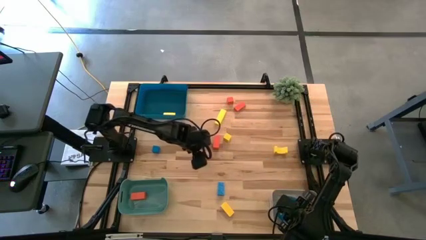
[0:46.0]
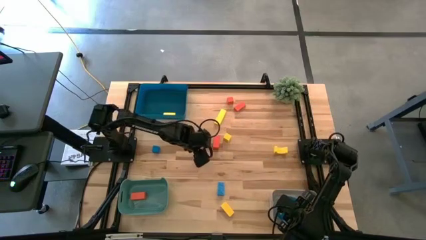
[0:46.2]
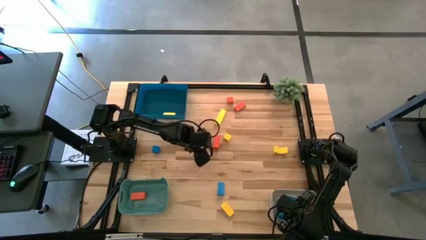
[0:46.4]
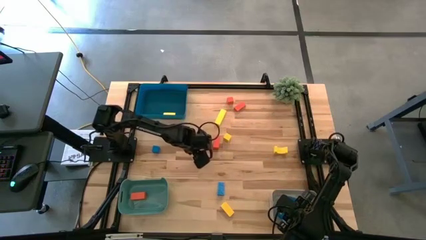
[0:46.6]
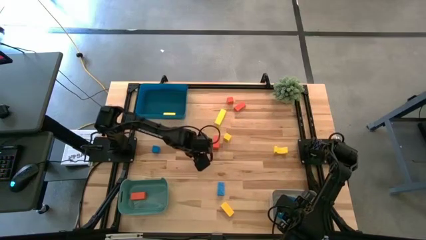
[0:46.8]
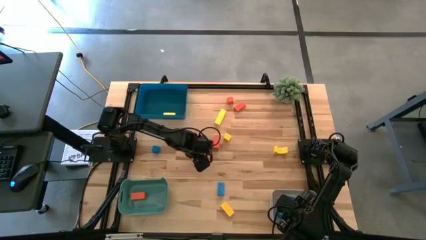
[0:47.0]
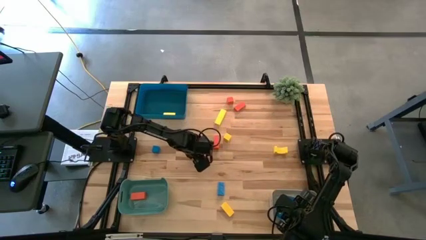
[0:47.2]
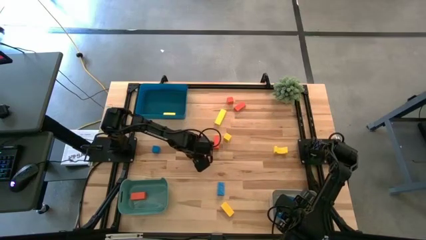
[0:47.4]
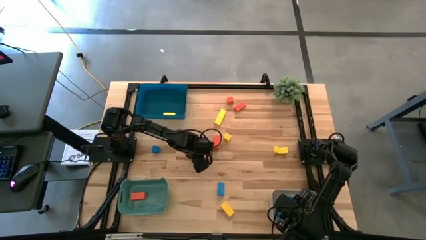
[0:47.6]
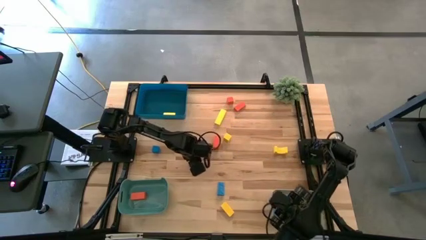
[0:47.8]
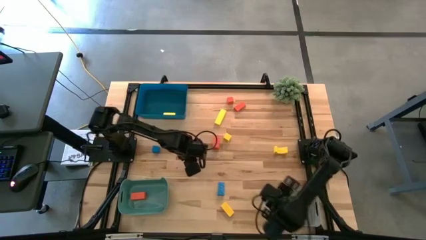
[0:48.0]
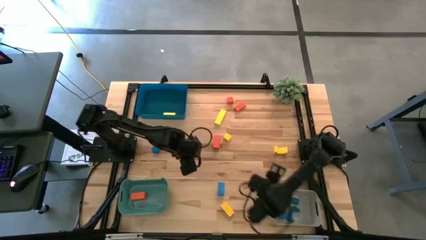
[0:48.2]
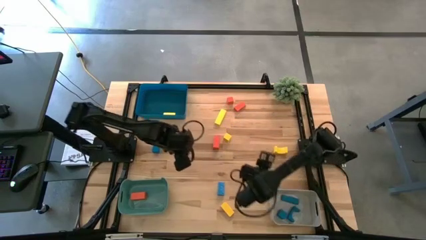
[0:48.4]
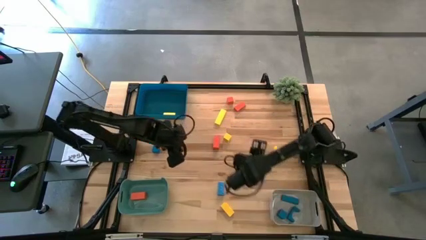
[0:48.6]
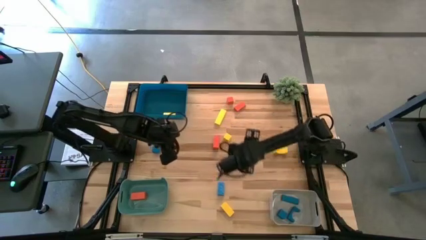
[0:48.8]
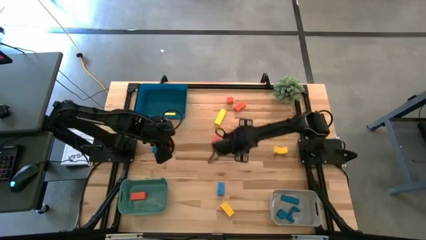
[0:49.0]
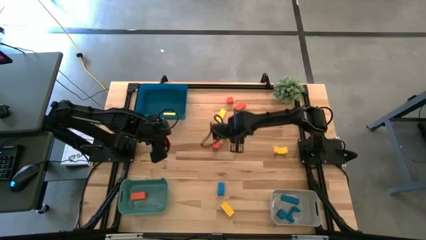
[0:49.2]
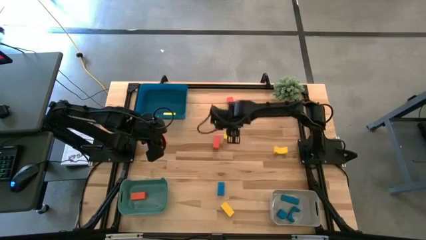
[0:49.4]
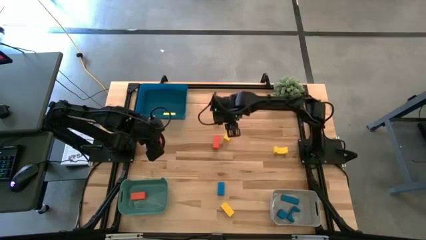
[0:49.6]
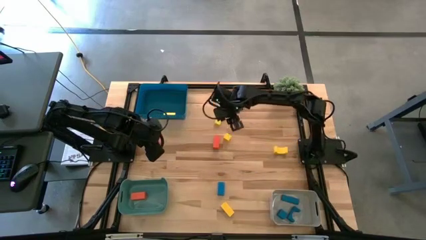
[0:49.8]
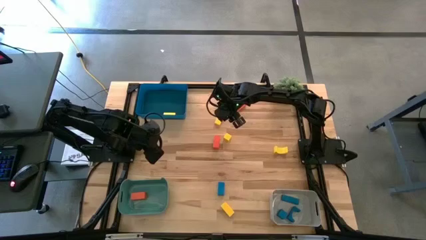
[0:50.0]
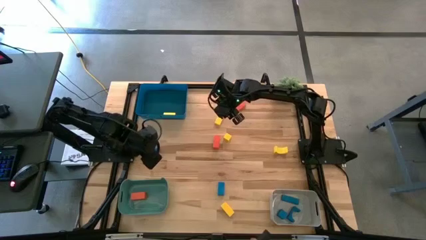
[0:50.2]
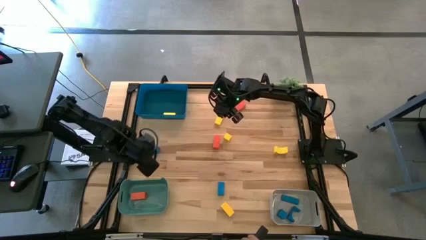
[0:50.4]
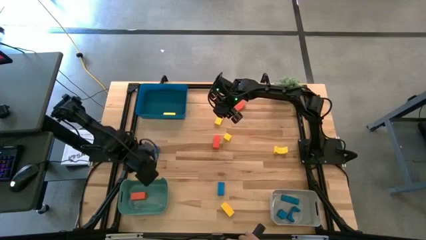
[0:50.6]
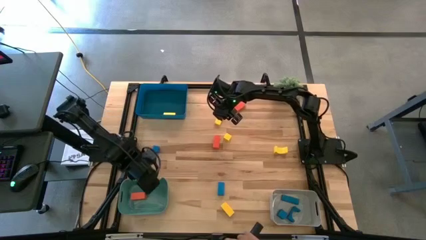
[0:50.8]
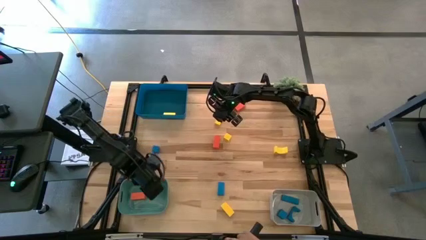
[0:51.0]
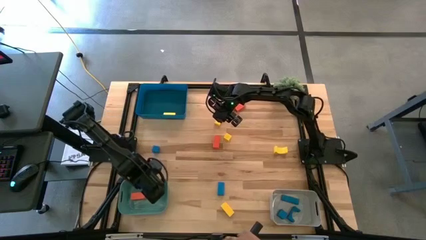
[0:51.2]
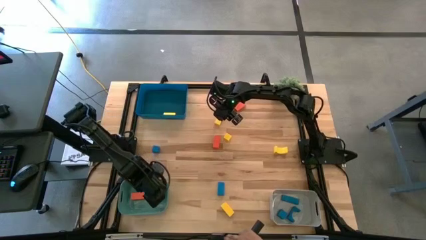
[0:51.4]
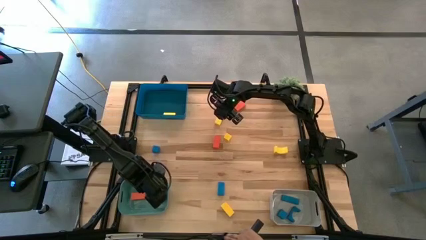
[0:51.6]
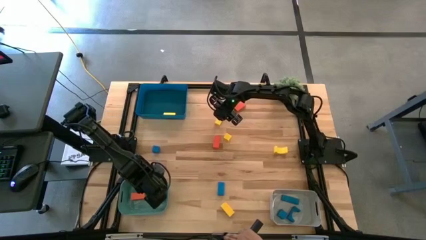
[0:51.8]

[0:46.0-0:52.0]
Task: Sort & place blocks by color
Put the bottom orange block into the green bin

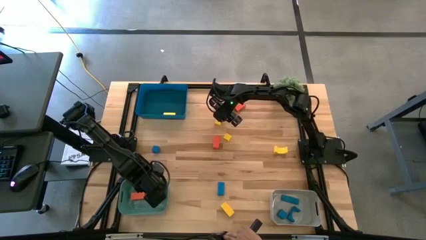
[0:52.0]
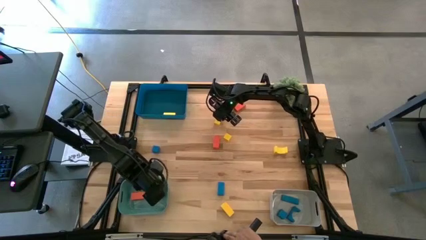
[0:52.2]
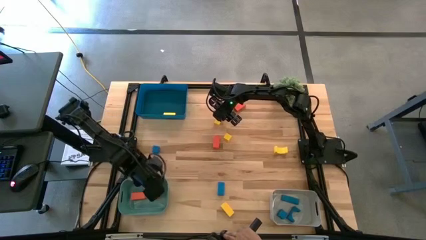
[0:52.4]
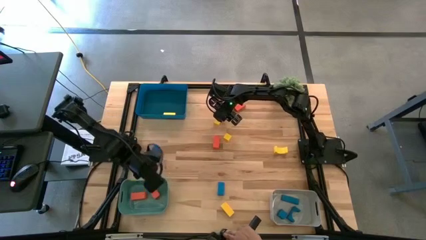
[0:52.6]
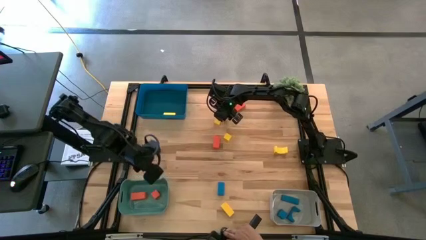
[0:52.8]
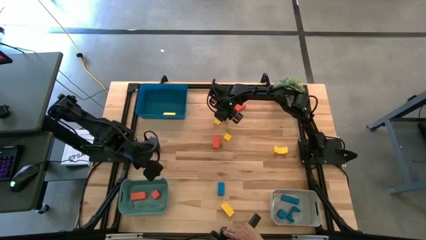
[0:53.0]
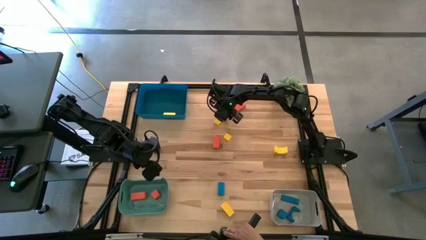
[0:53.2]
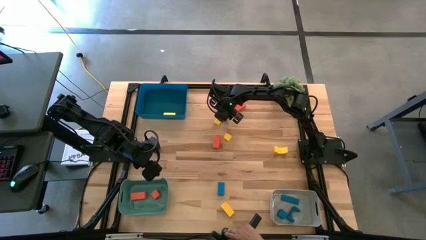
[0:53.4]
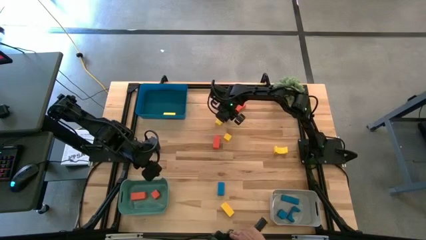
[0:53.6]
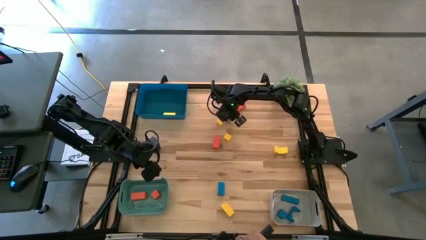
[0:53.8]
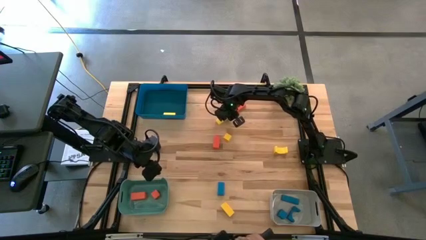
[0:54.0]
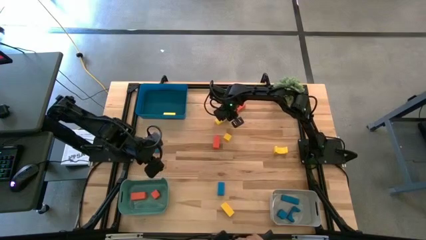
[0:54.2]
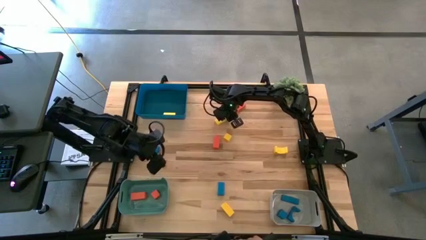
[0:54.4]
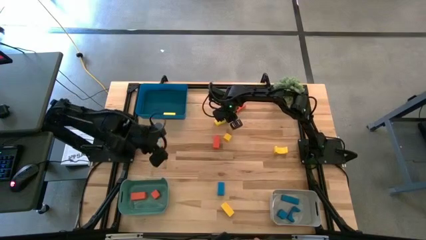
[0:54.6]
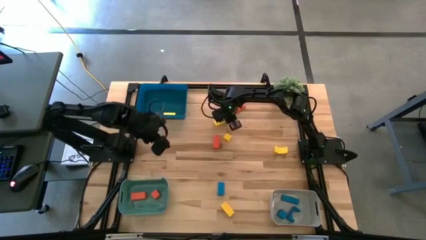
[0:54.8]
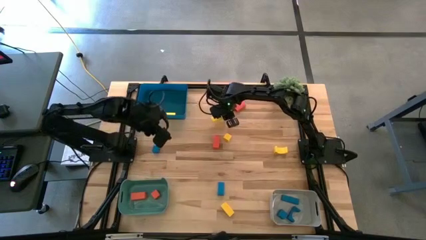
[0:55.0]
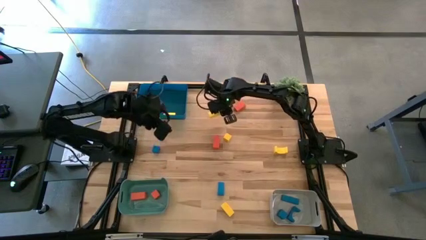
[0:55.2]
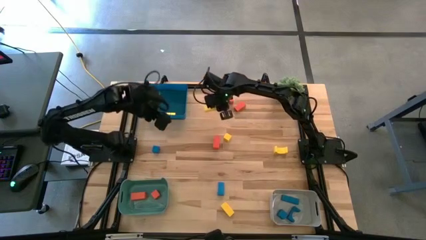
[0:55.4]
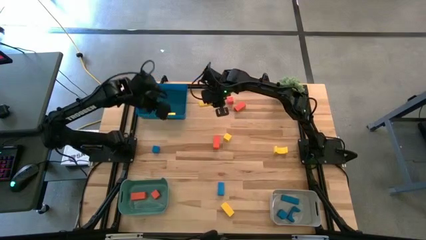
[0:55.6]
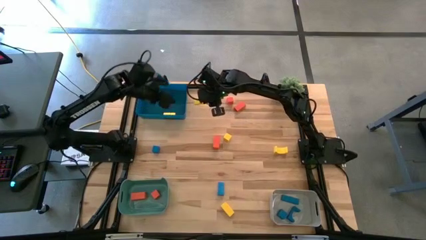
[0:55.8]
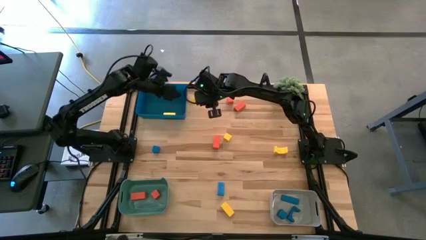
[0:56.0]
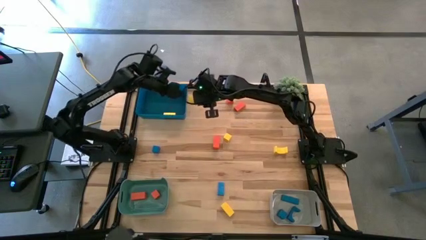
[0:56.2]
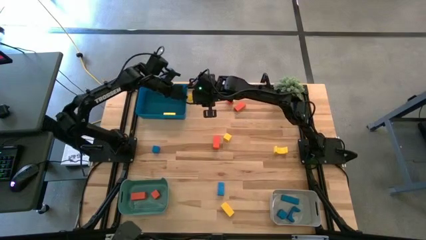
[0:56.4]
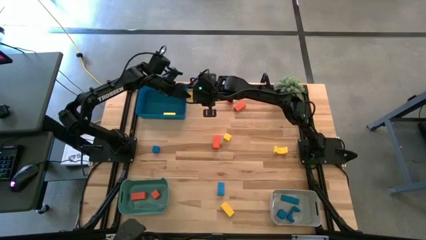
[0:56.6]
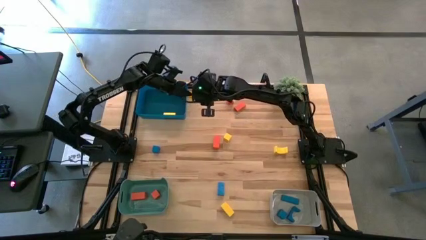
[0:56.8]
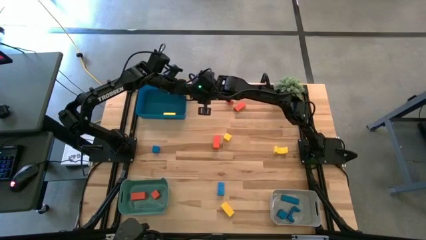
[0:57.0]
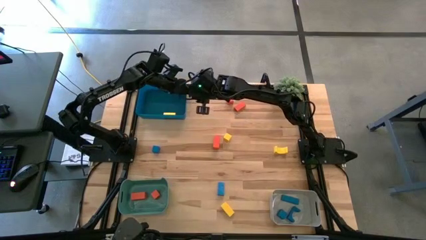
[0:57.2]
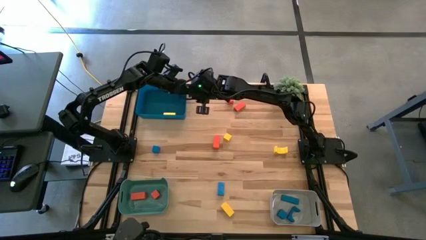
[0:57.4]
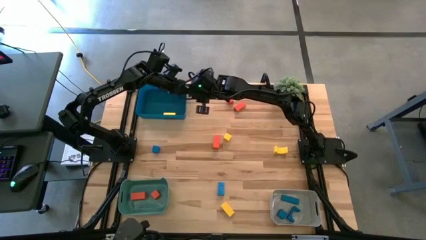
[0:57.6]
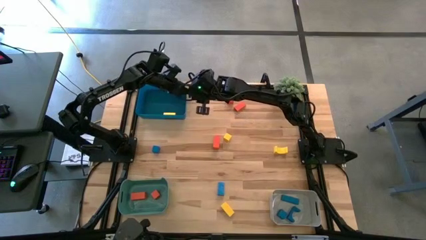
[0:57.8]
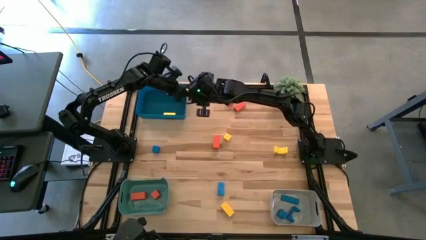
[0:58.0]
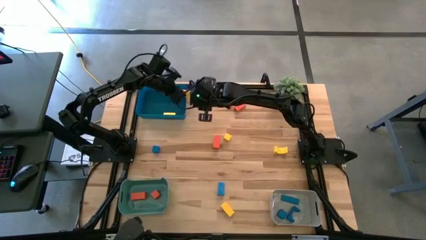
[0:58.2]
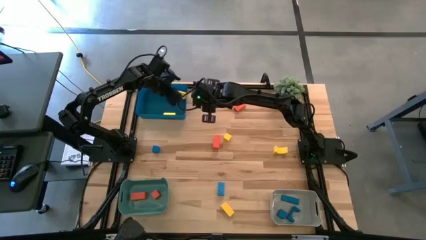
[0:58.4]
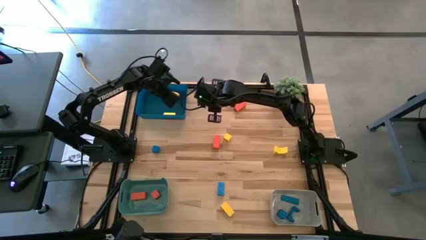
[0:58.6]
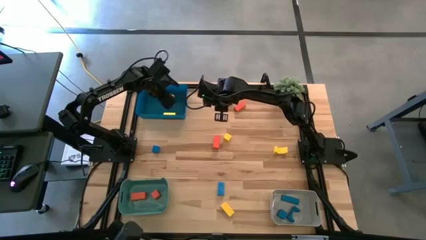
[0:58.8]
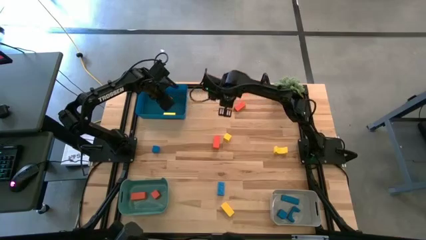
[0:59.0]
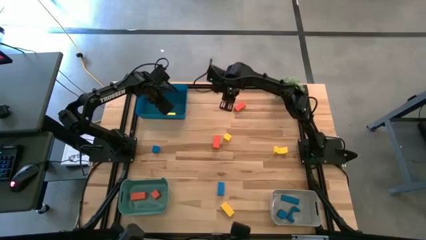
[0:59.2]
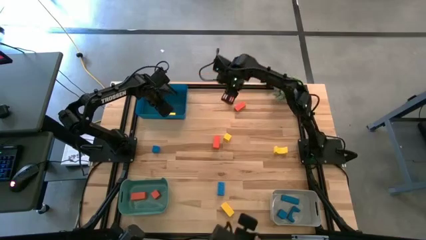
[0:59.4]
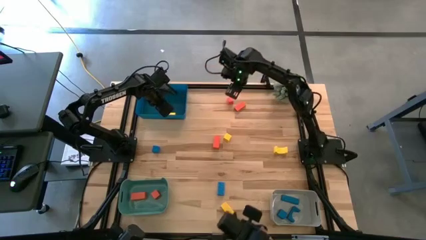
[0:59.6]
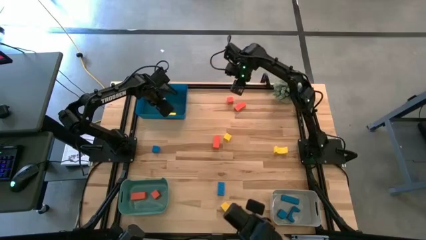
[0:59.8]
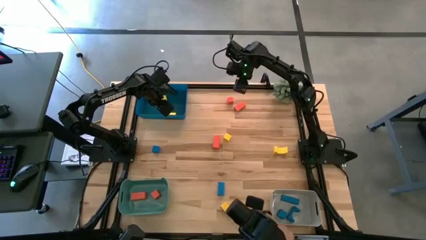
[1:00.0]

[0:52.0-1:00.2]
Put the top yellow block into the dark blue bin

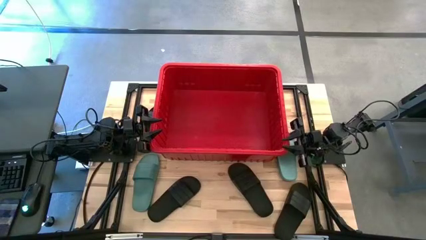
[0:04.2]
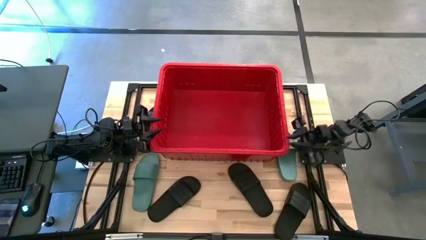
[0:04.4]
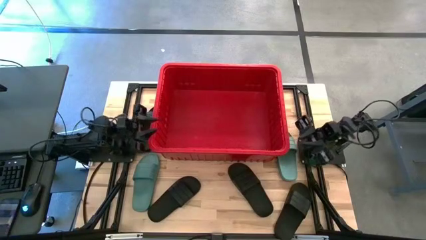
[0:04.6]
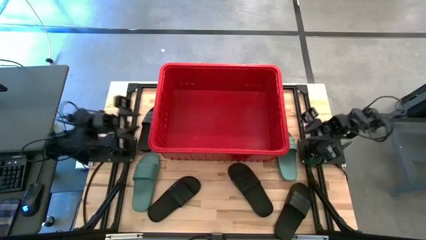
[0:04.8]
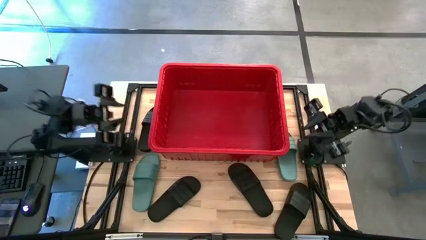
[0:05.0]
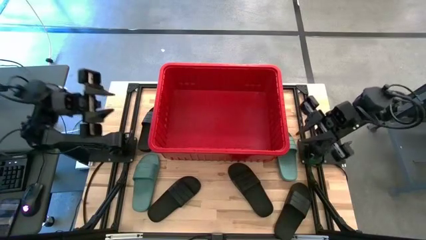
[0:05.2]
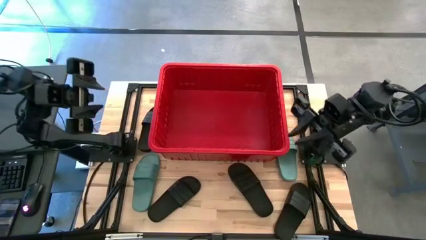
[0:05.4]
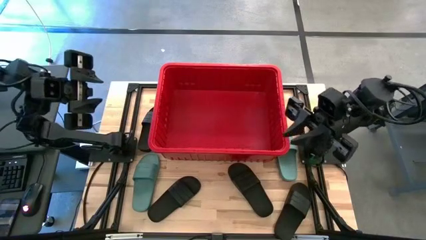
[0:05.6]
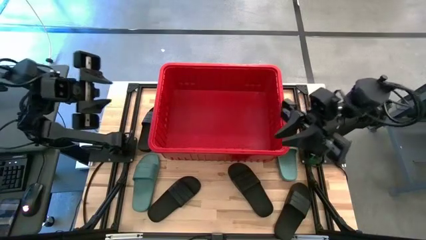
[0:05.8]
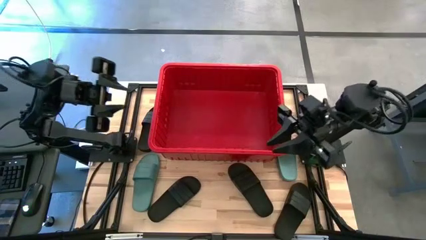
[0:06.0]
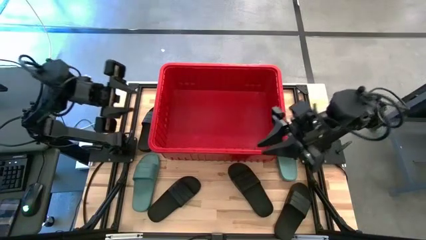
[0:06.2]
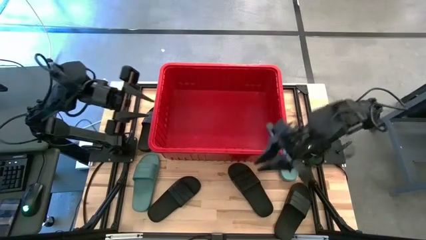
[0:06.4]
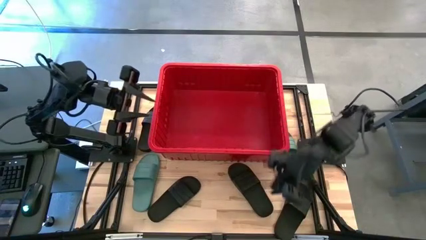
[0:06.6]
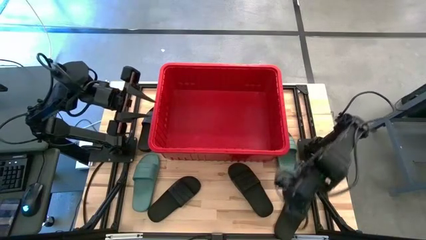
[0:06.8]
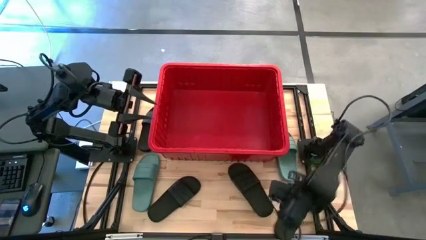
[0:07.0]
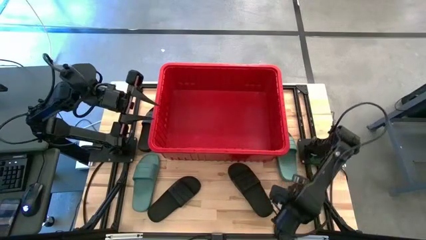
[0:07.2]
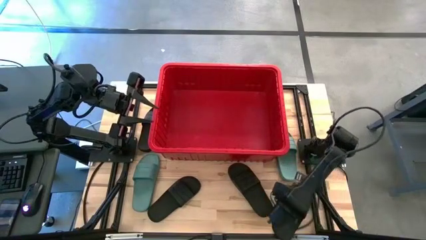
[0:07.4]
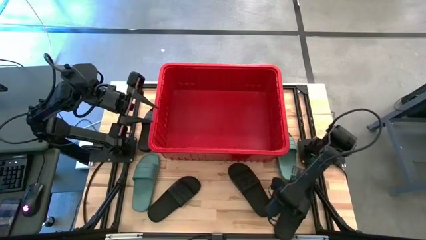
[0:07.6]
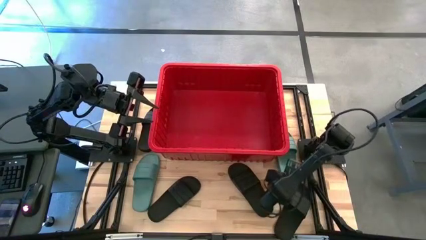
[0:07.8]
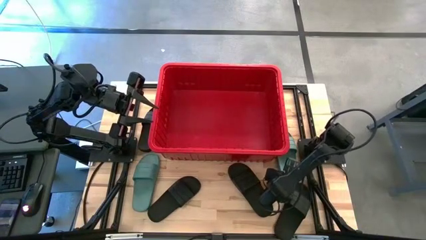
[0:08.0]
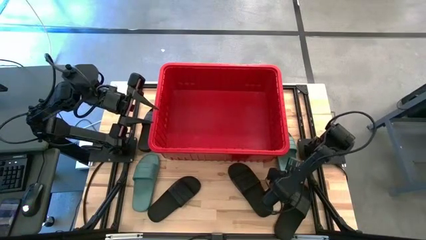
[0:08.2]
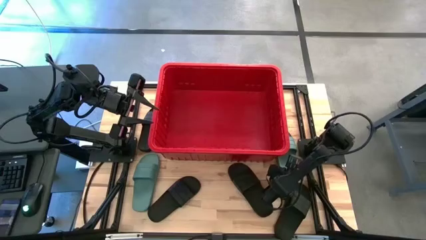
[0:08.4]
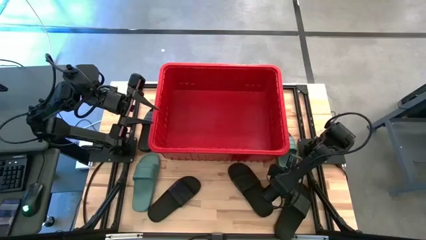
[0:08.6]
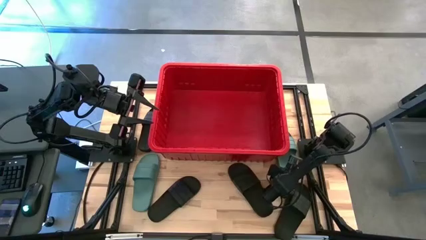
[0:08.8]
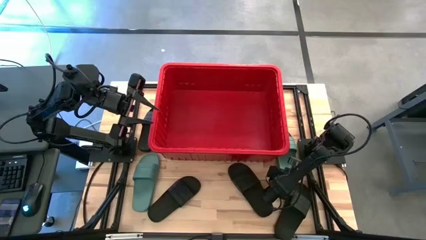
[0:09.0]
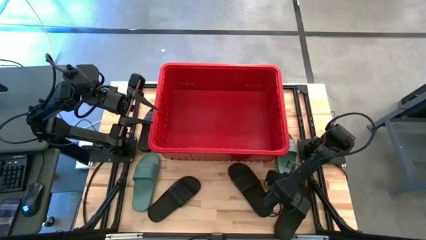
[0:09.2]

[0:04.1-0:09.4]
Task: Pick and place slides into bin
Put the green slide into the red container
